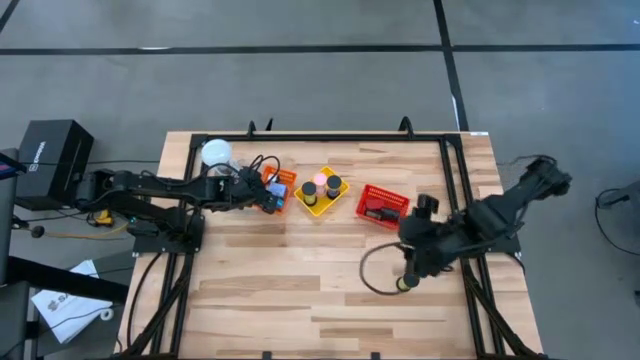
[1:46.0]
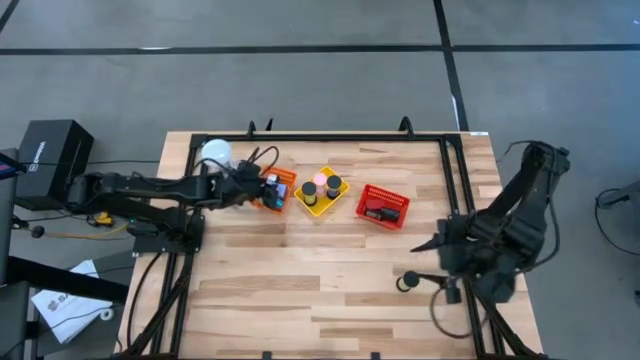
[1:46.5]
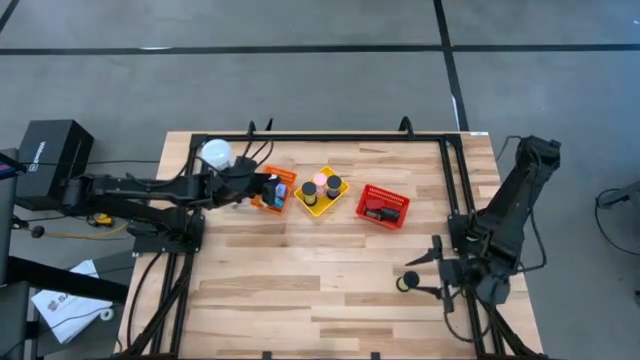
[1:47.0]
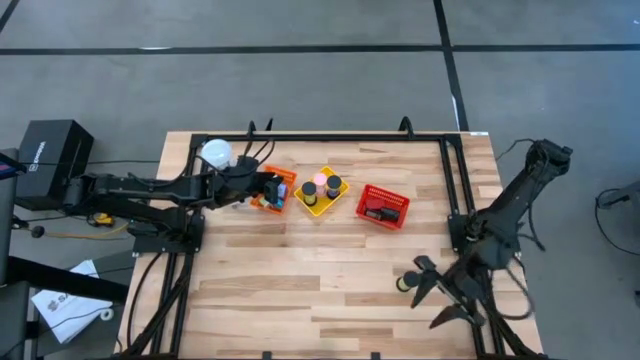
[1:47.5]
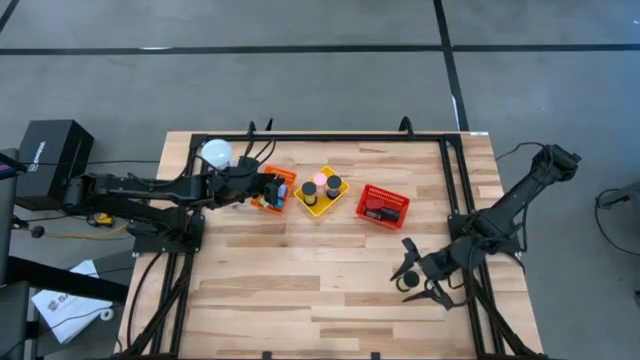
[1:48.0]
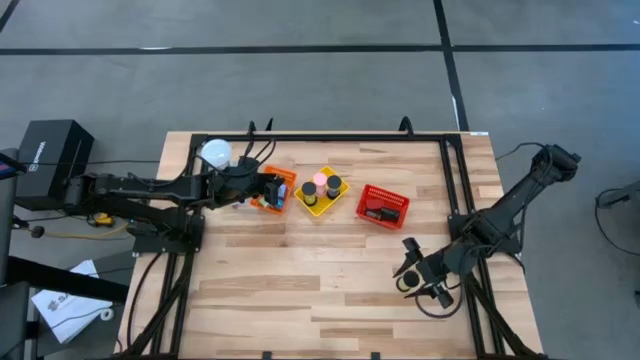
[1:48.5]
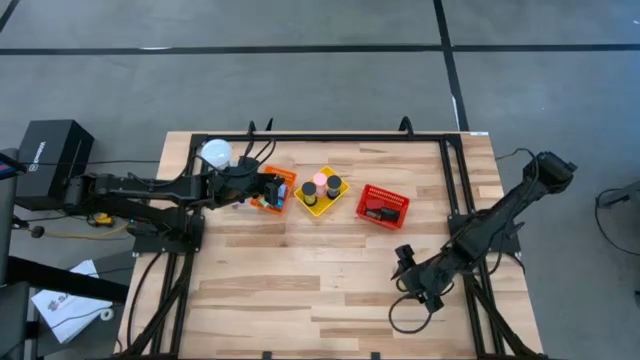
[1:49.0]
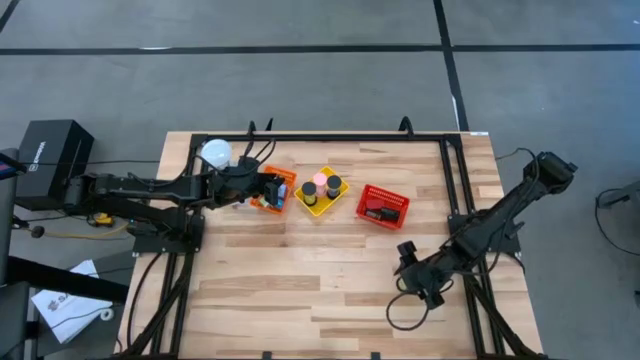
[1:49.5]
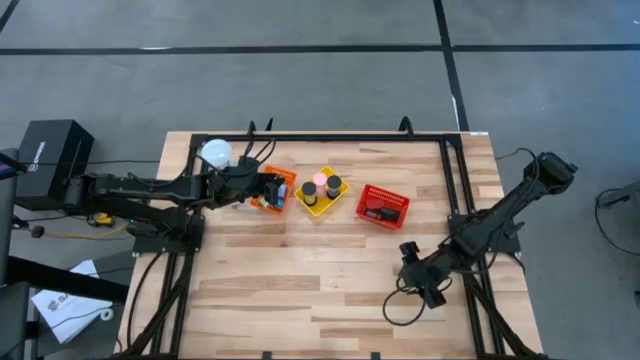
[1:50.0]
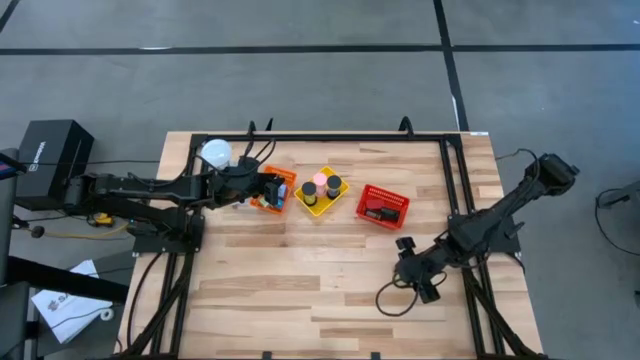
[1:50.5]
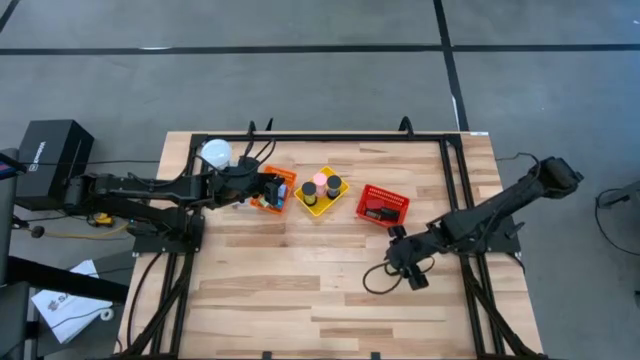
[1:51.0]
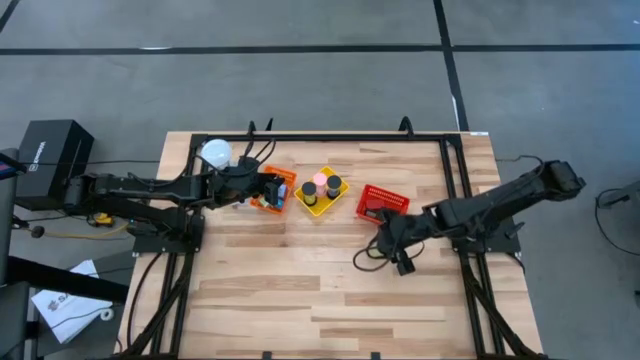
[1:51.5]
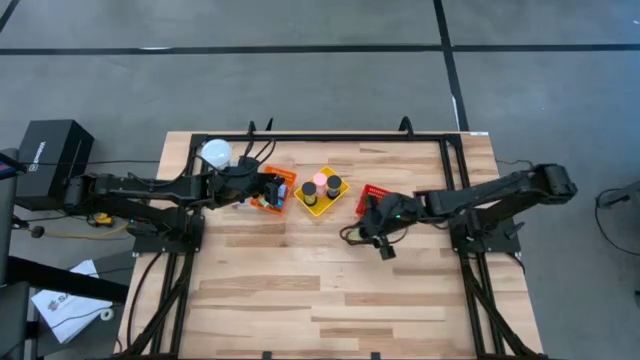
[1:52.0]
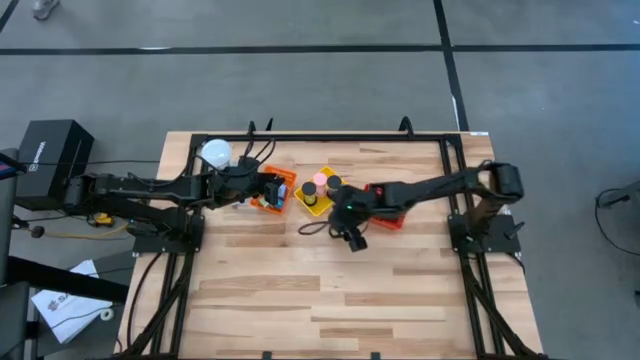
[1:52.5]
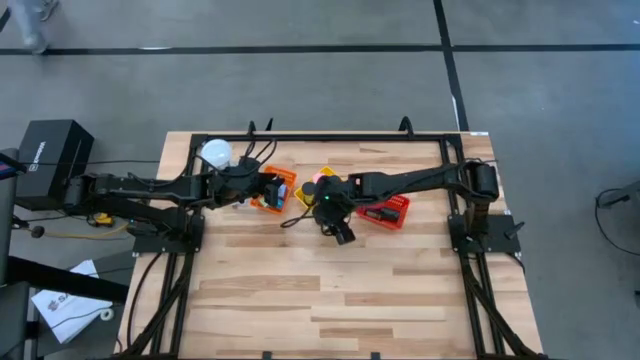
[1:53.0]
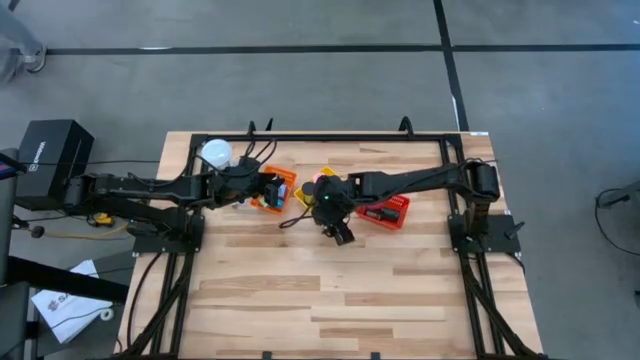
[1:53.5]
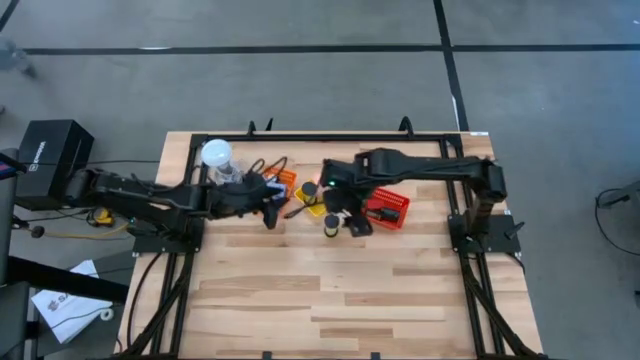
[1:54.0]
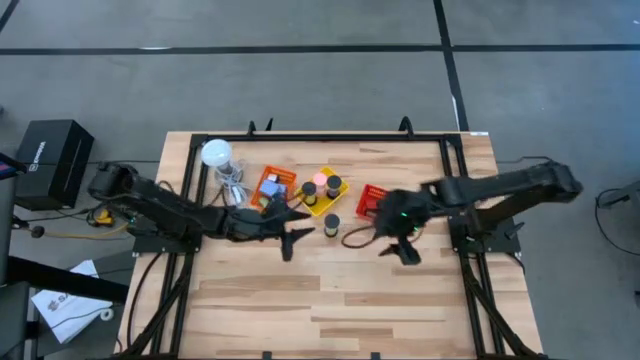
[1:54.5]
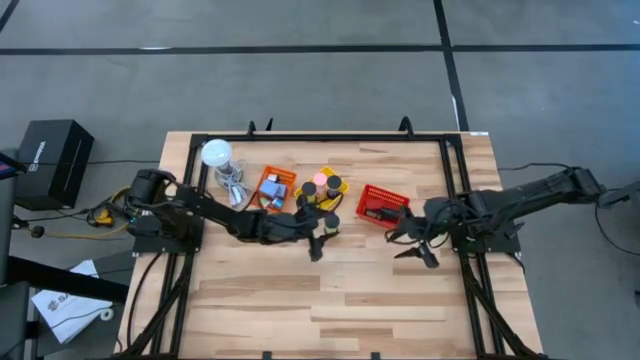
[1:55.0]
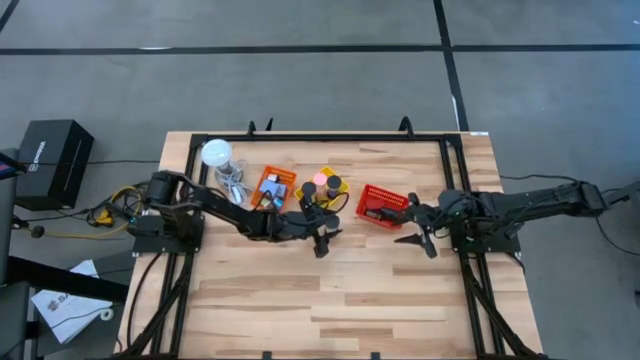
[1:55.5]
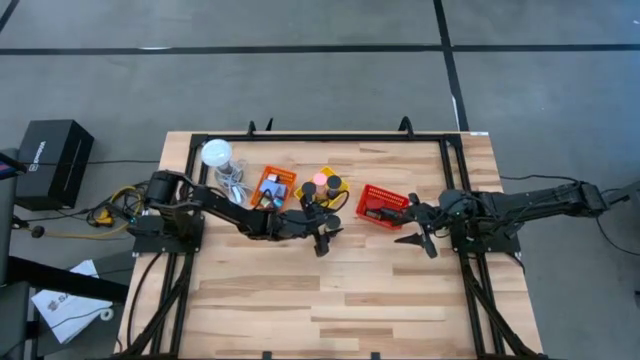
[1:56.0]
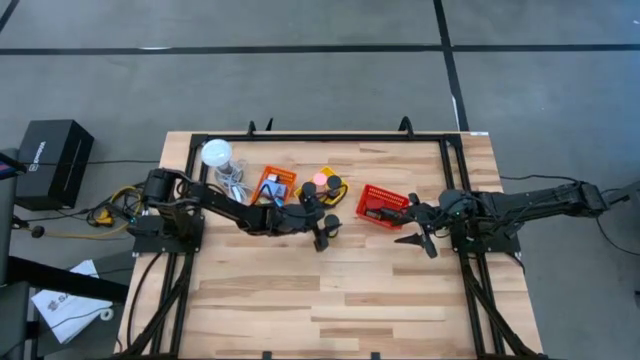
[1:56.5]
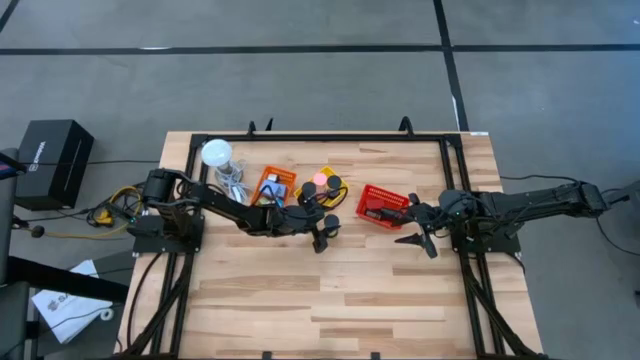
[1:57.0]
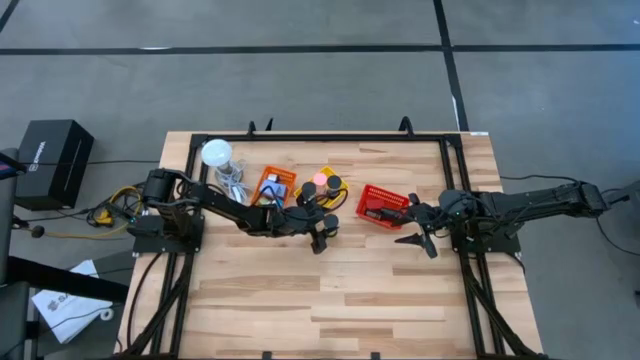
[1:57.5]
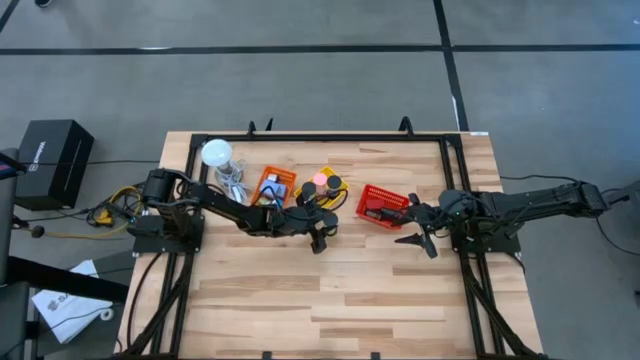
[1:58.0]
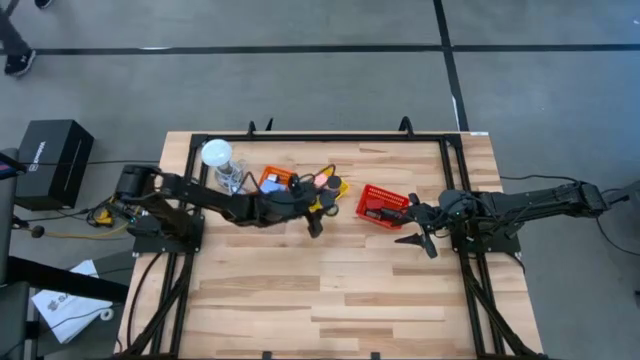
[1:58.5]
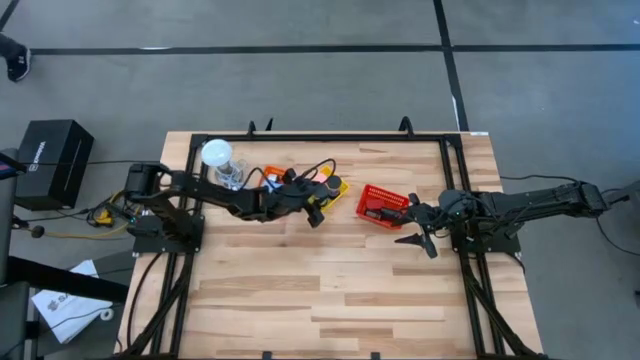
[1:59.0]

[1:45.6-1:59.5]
Task: Pick & Place Office items
Put the green hourglass into the yellow bin

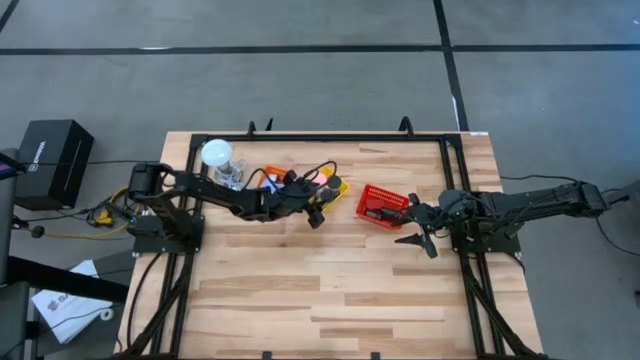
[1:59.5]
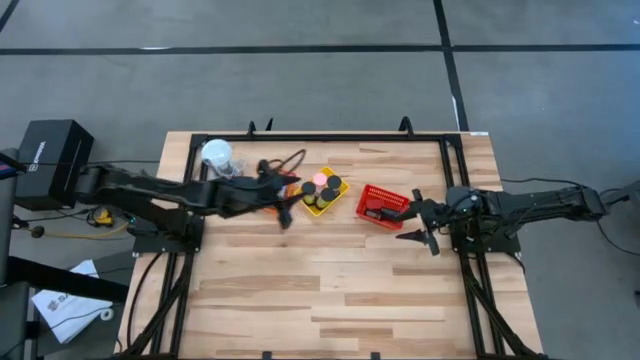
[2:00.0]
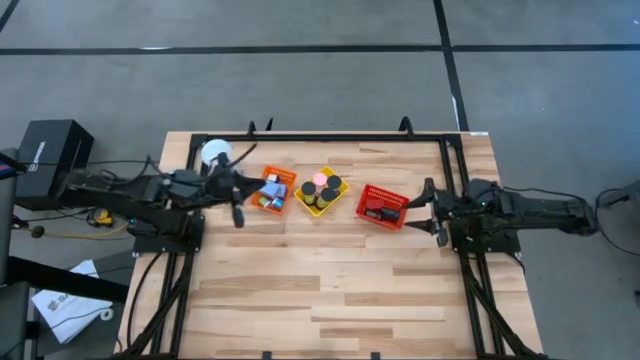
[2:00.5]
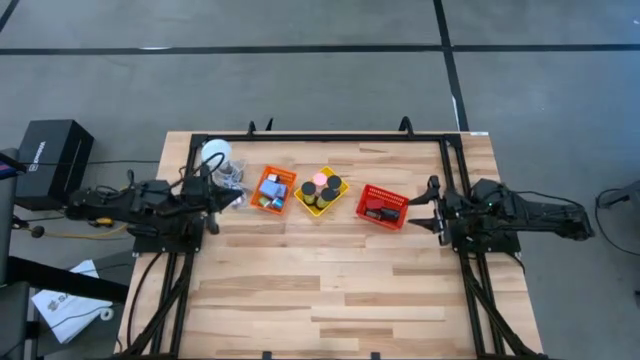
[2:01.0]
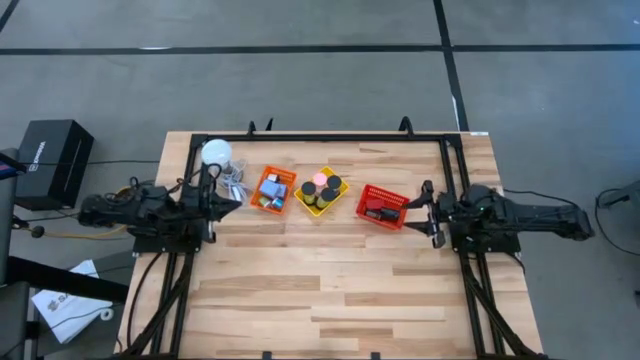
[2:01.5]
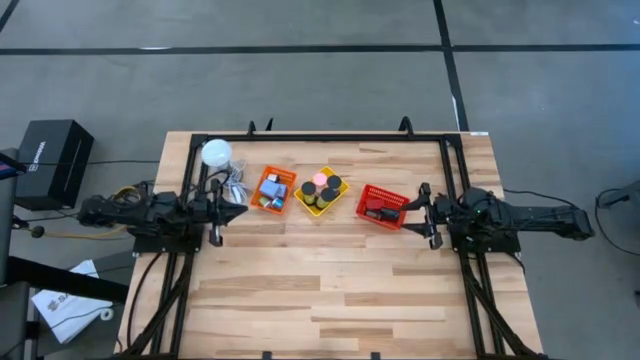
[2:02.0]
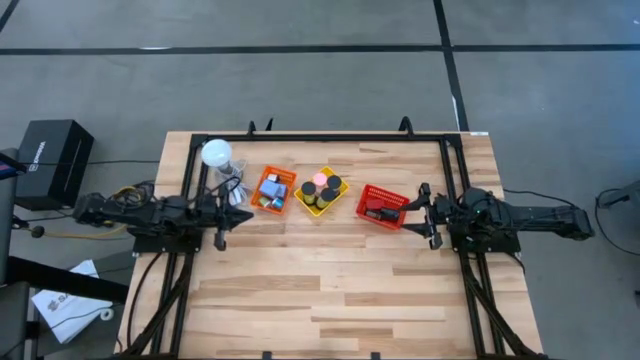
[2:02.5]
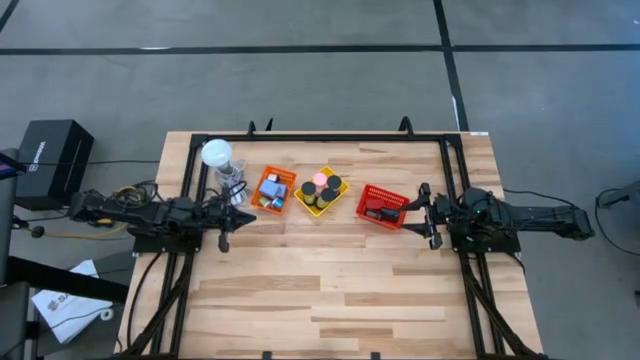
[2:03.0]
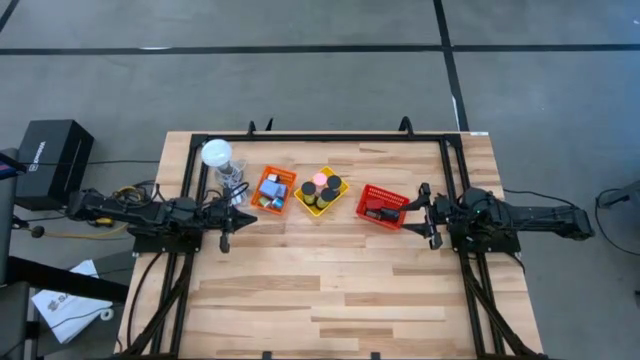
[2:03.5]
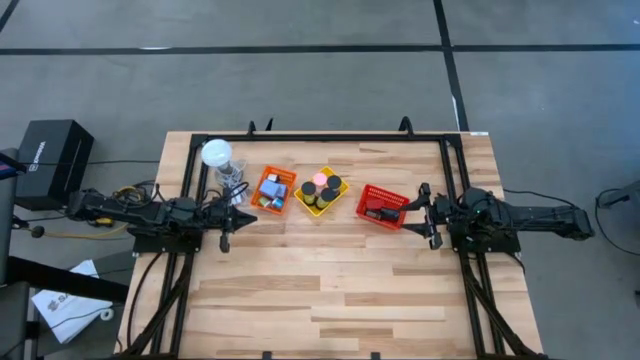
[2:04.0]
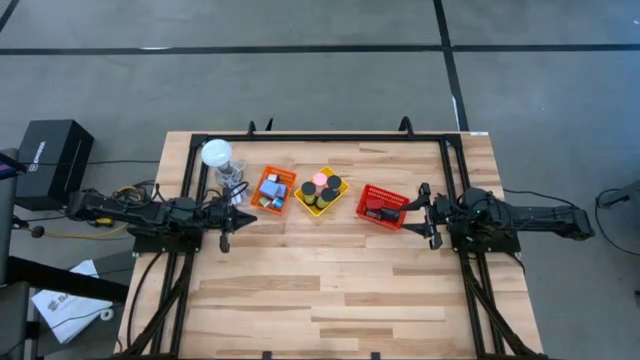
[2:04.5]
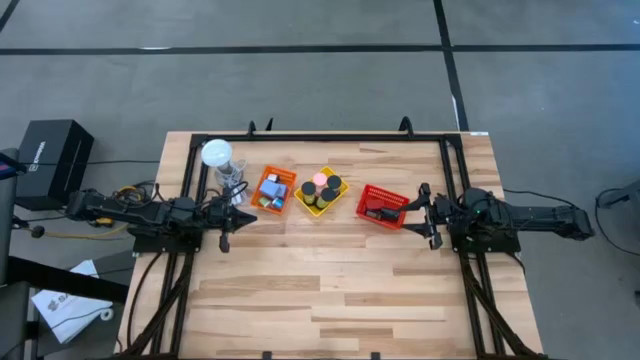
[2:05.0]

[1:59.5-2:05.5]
Return to Home Position

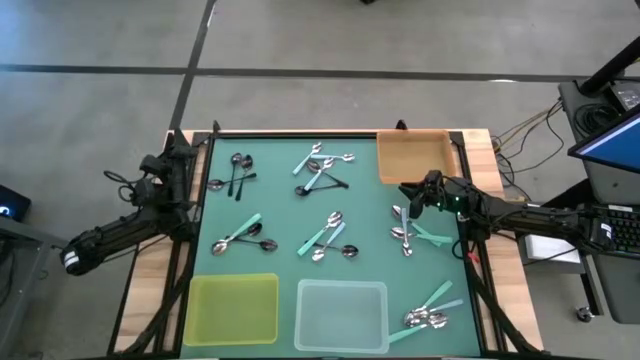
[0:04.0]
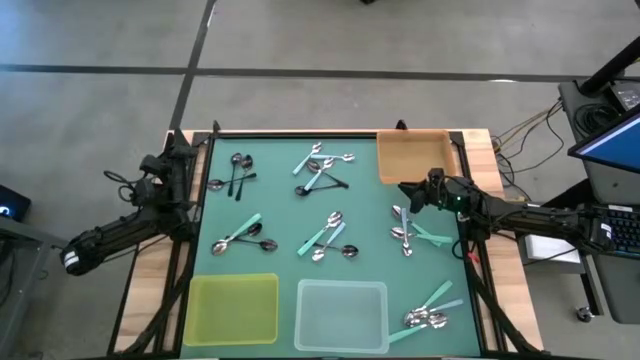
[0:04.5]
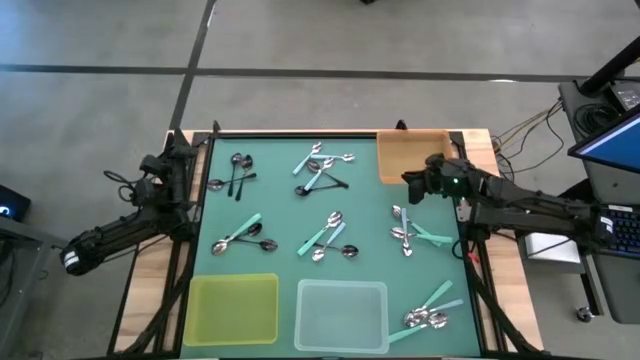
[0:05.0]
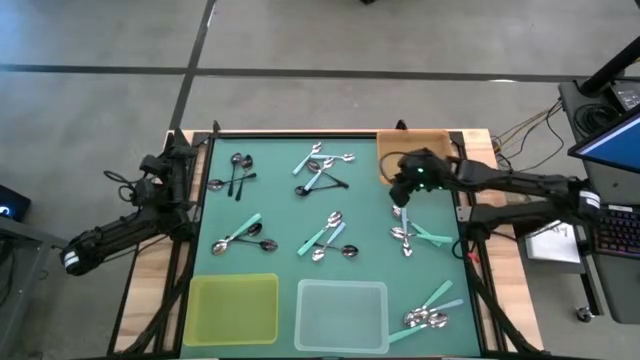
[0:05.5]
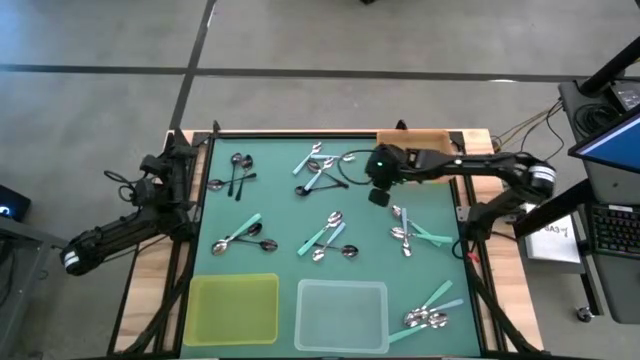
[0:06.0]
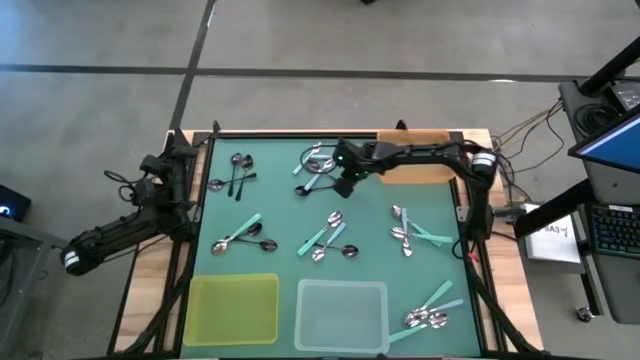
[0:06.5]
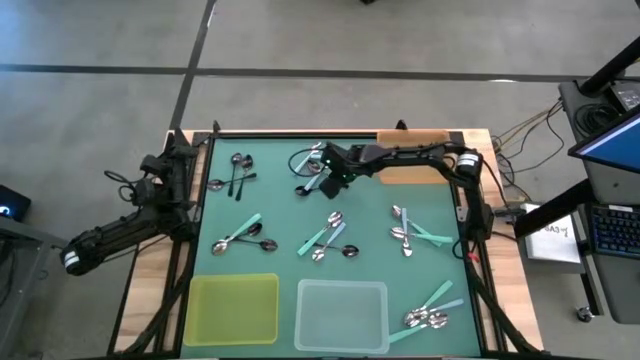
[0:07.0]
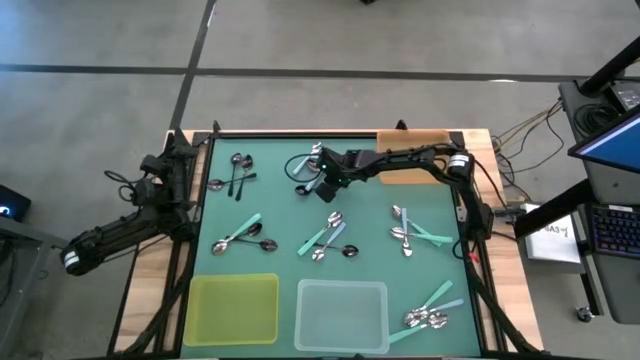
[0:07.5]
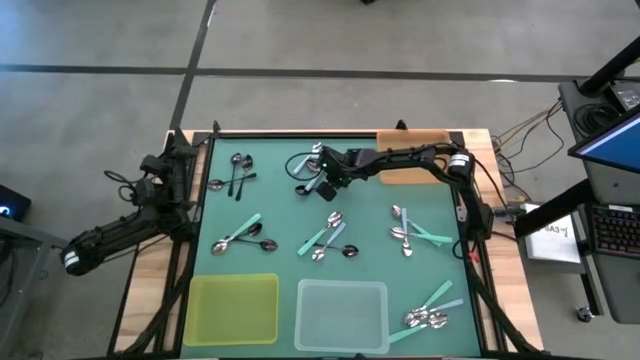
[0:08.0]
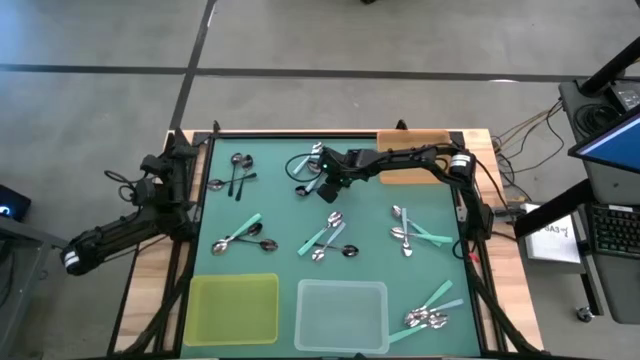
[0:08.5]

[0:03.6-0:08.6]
Task: Sort silverware by color (type)
Put the black spoon into the orange bin
